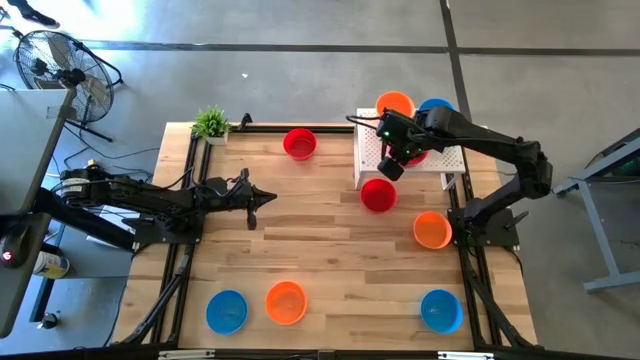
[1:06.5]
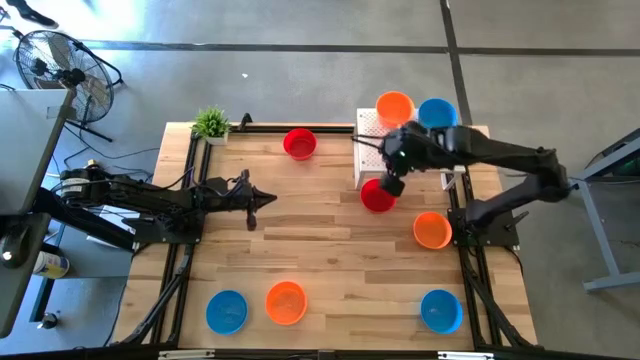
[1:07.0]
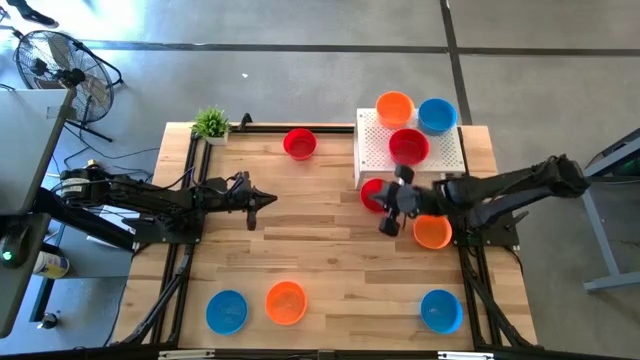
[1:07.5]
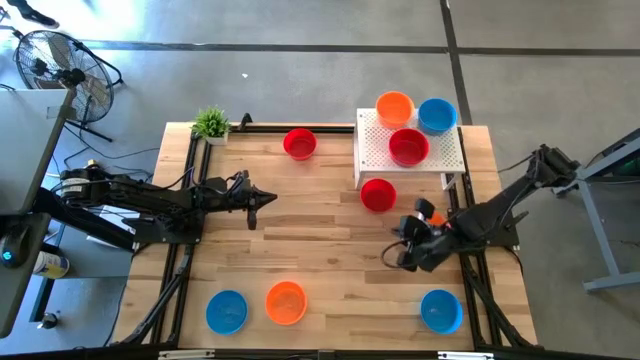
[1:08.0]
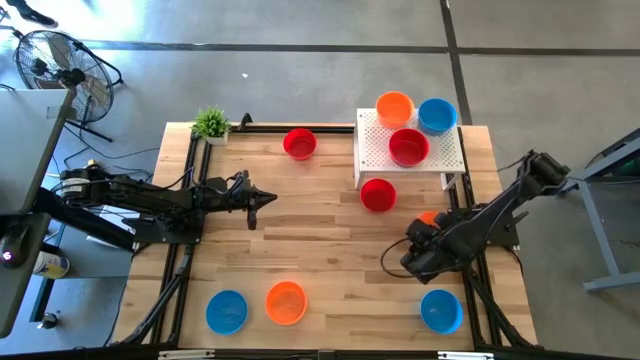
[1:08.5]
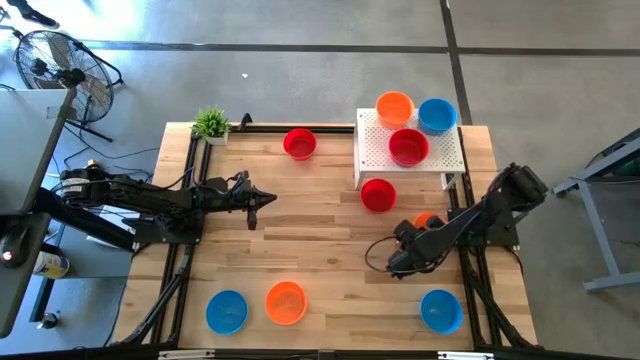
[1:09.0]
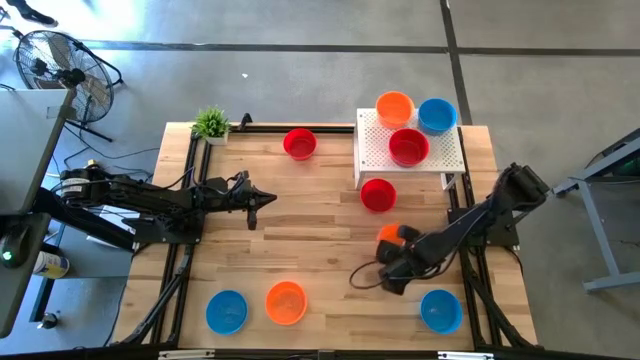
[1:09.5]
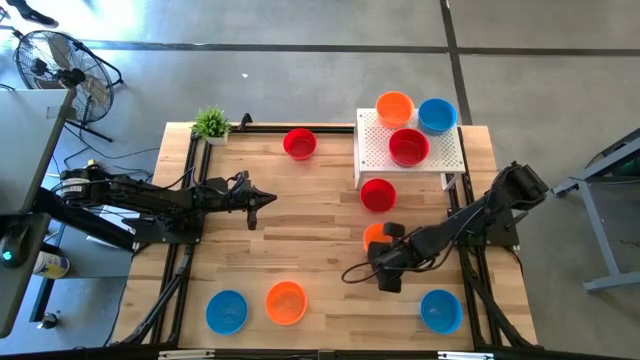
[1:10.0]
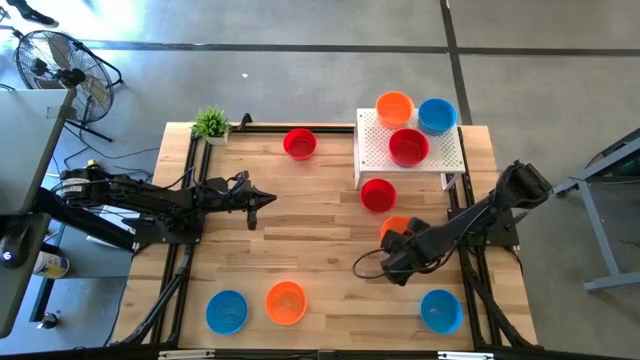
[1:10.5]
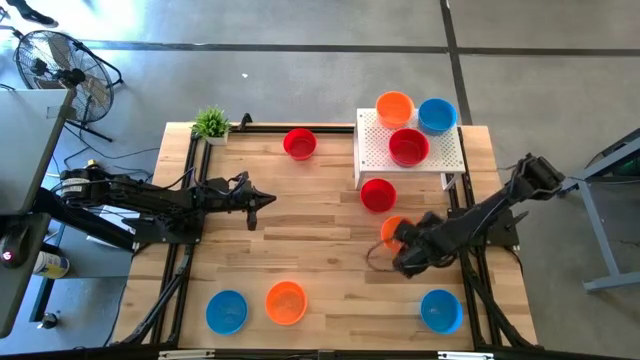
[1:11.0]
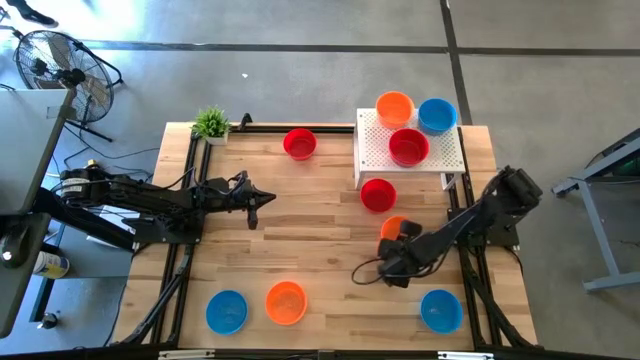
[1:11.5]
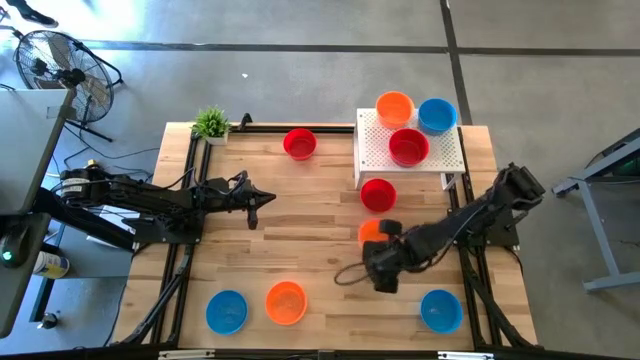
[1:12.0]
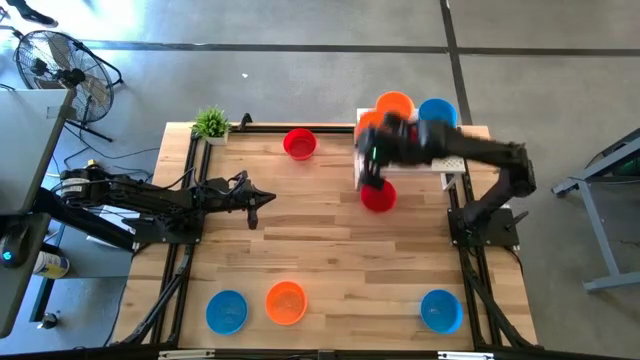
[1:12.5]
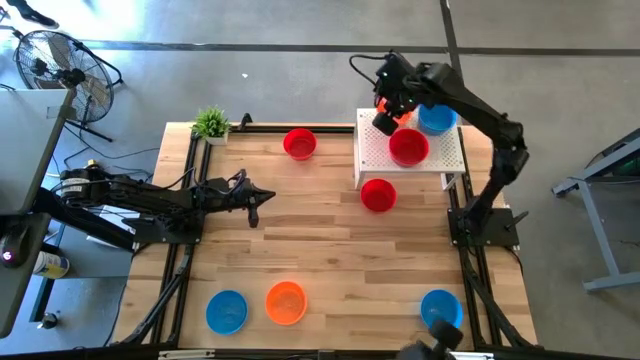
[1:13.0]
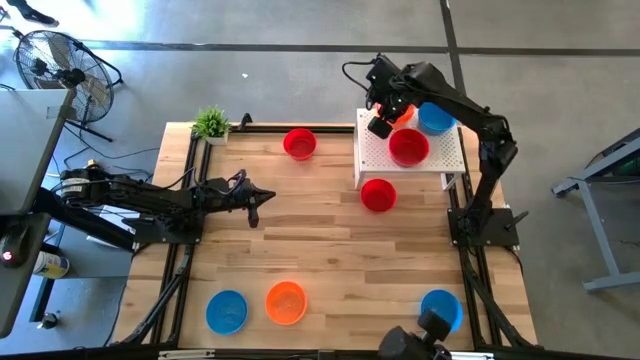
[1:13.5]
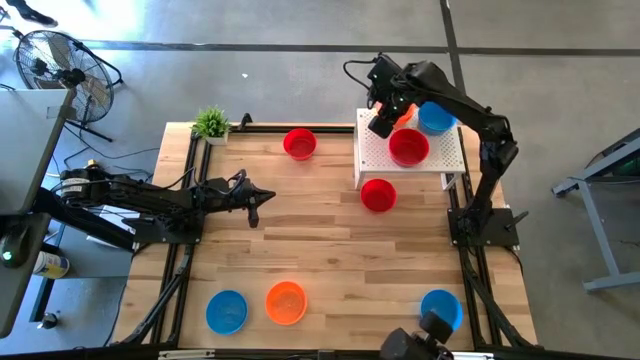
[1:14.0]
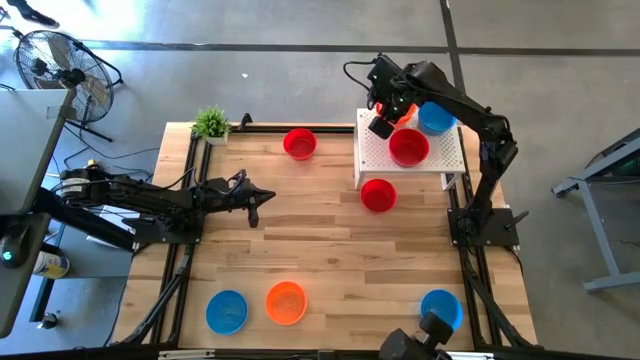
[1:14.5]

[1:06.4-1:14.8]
Task: Pick & Place Mini bowls
Stack the orange bowl on top of the orange bowl on the shelf

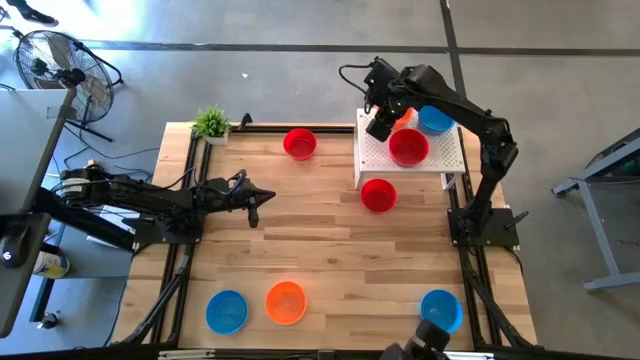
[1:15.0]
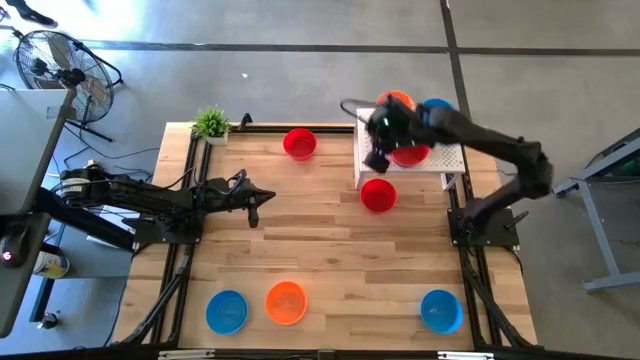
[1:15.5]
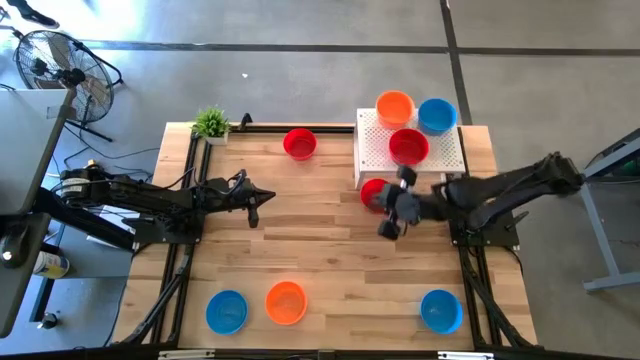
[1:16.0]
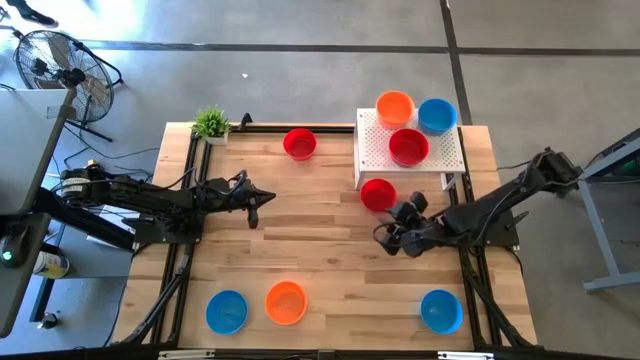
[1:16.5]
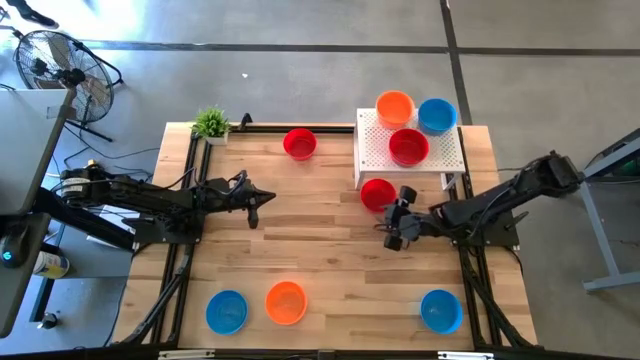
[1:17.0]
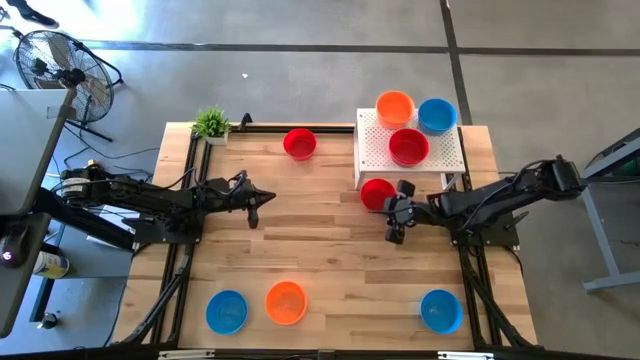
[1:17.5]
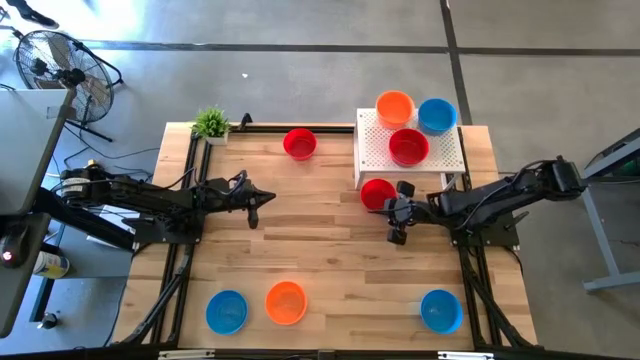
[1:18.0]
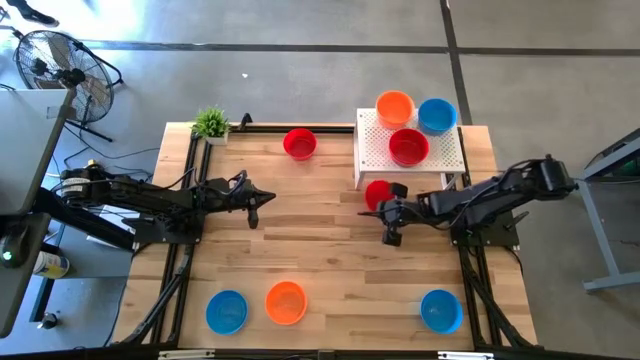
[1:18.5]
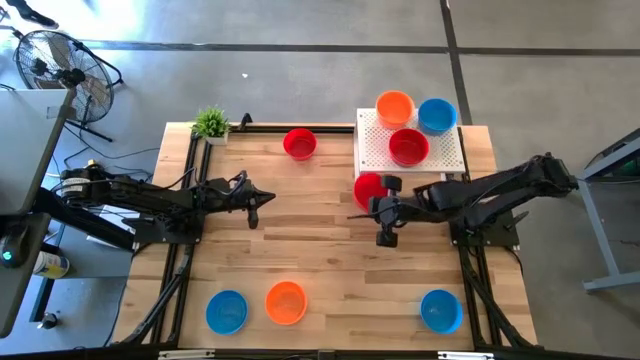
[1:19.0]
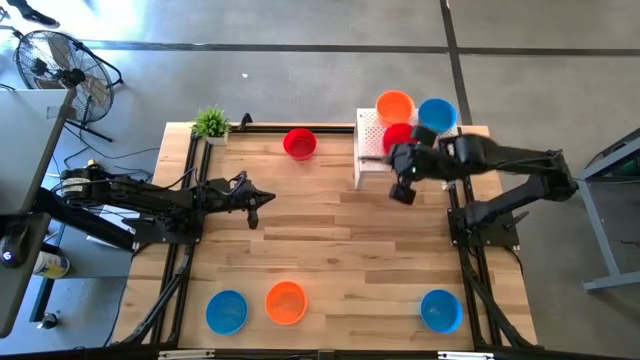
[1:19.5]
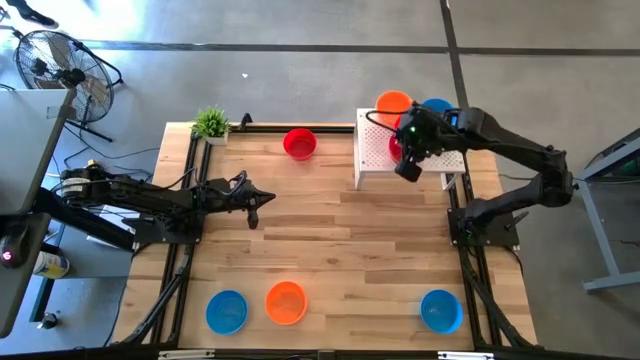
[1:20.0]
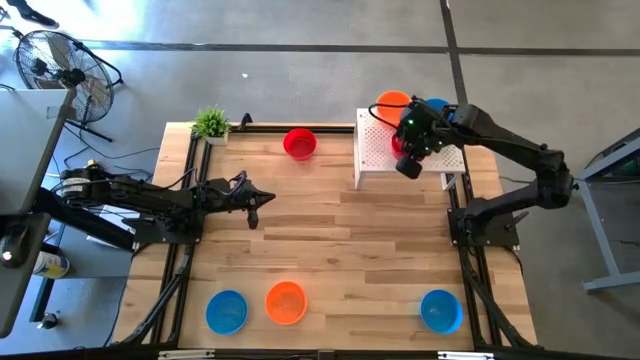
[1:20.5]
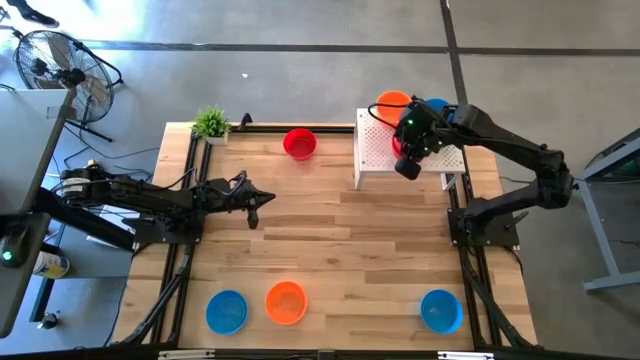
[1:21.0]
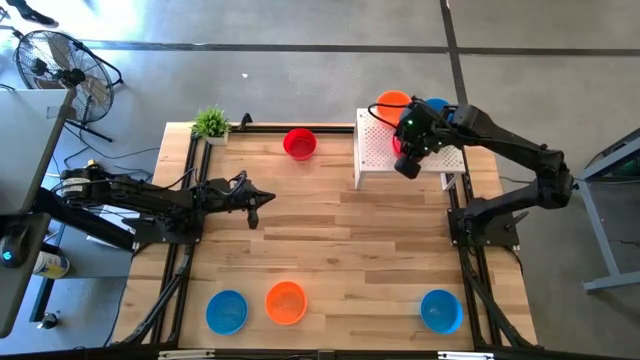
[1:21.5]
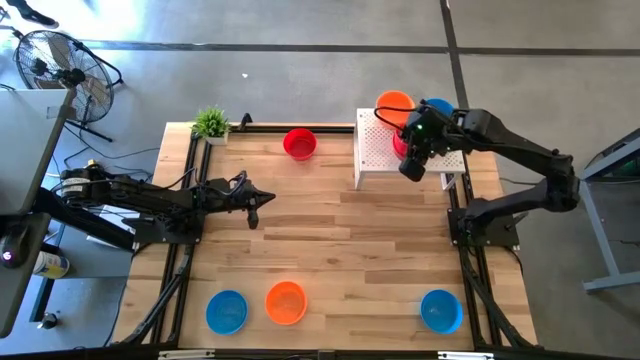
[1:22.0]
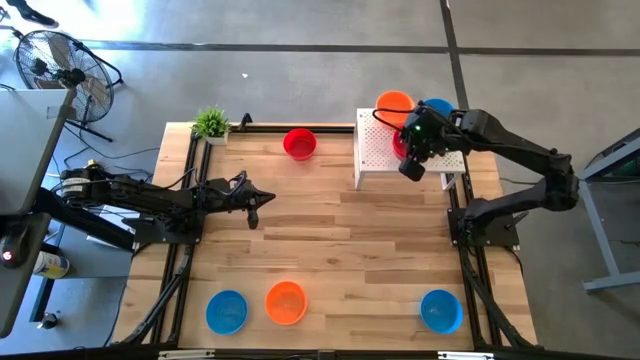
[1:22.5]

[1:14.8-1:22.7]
Stack the red bowl on top of the red bowl on the shelf

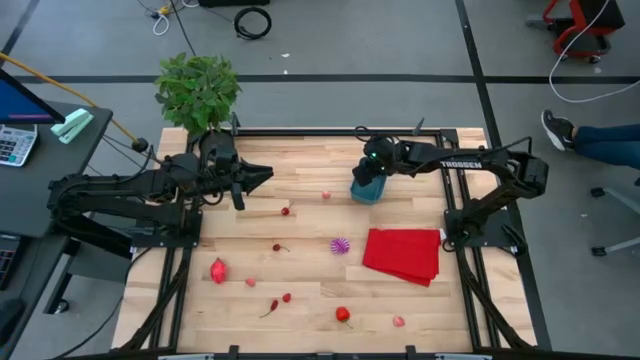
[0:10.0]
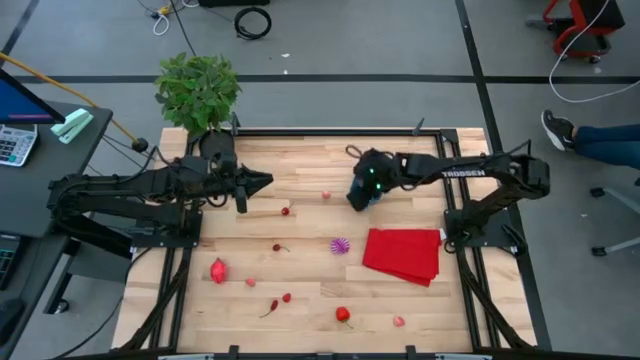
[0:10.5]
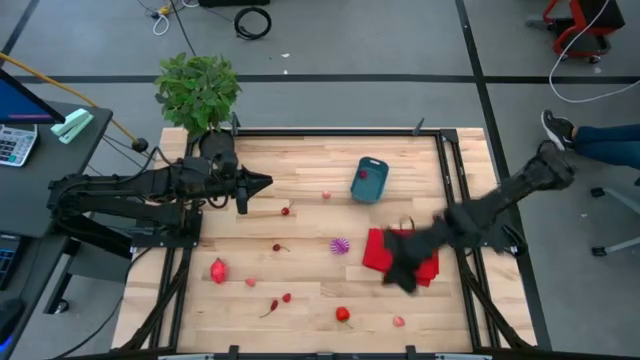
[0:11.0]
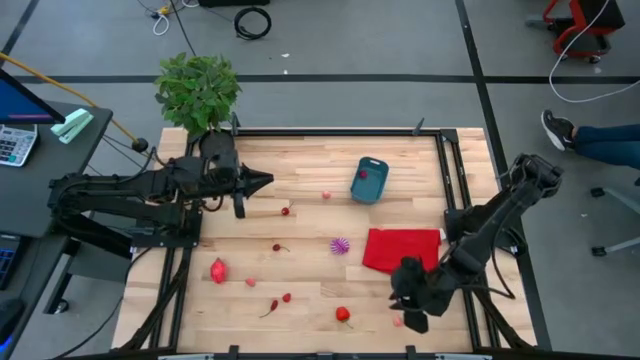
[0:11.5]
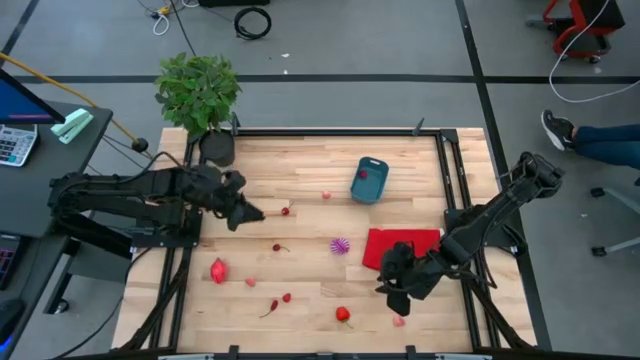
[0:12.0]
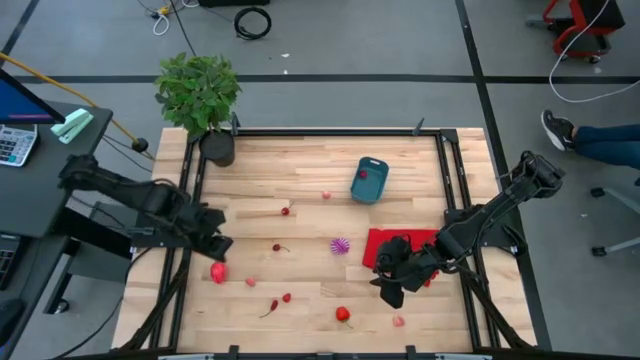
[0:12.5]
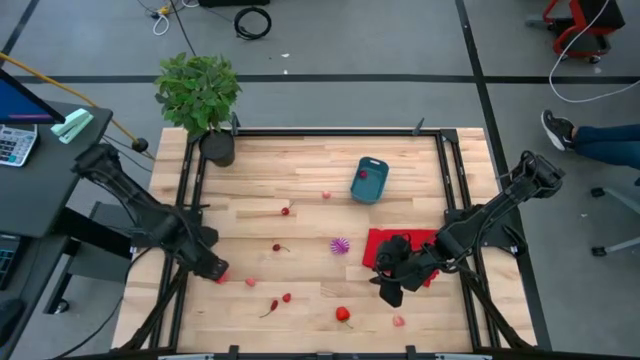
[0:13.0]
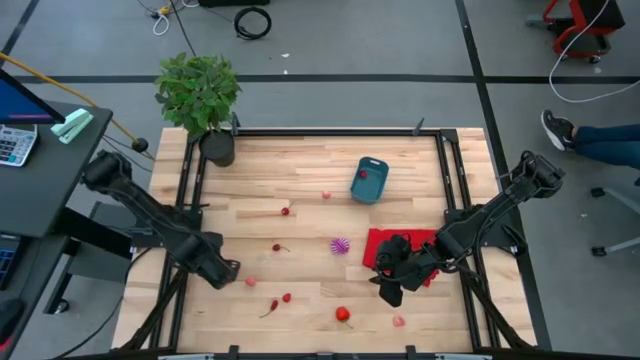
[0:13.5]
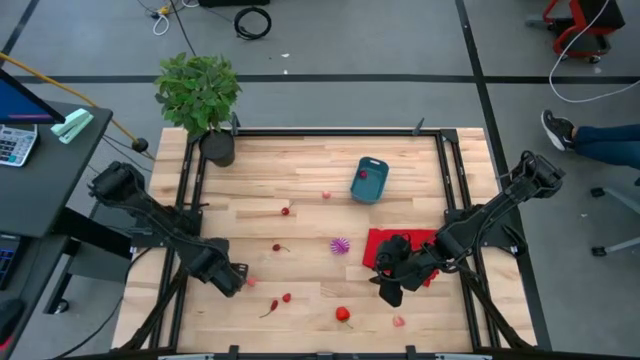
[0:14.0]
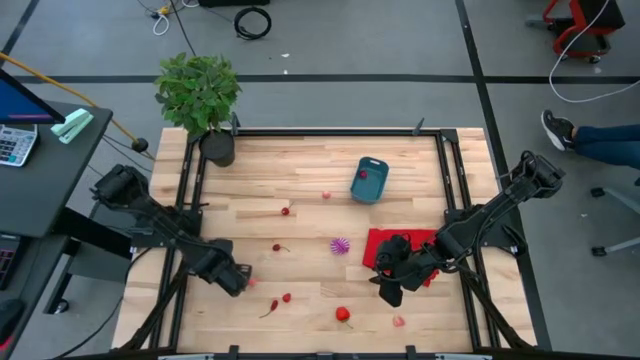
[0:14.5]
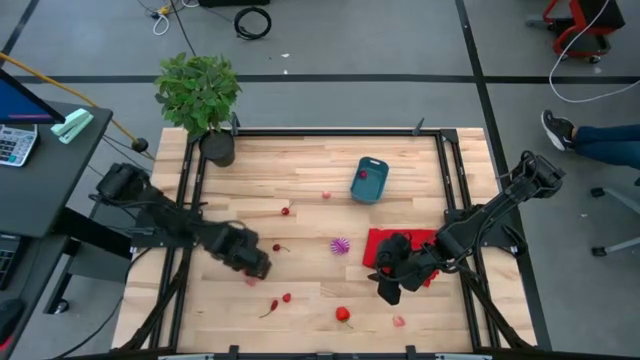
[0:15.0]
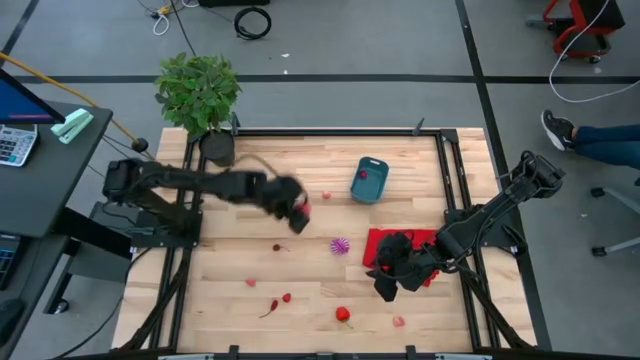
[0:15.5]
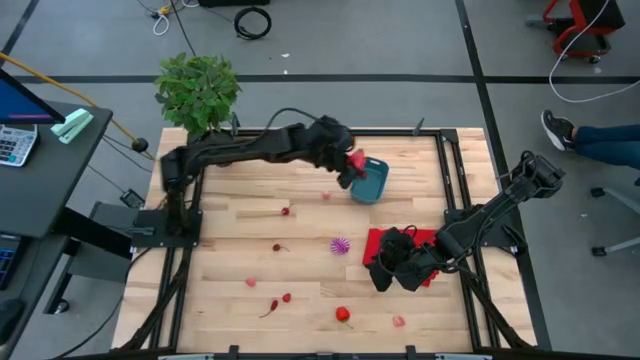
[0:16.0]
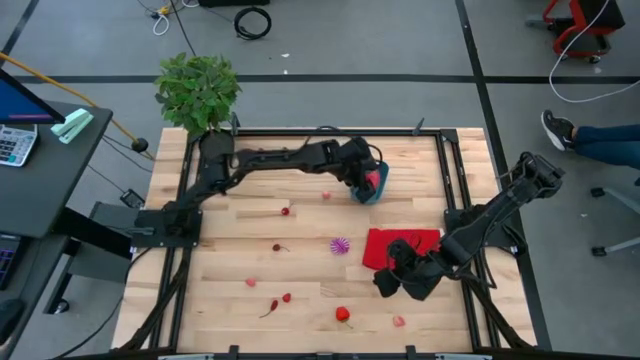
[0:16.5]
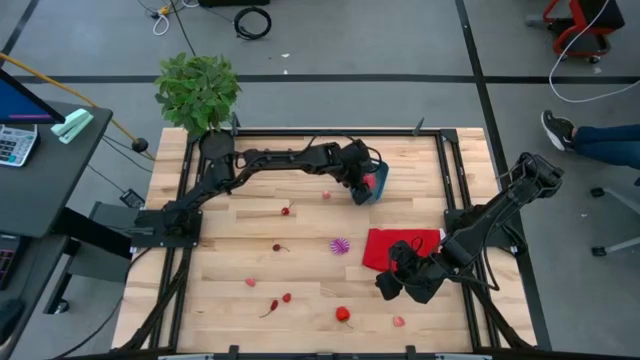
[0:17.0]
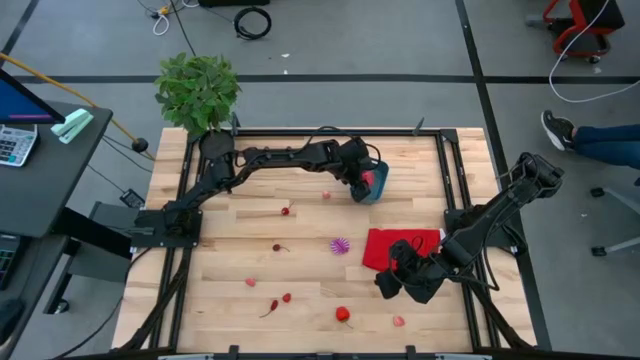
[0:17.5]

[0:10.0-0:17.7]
Task: Pick and placing Produce into tupperware
Put the dragon fruit into the bin
